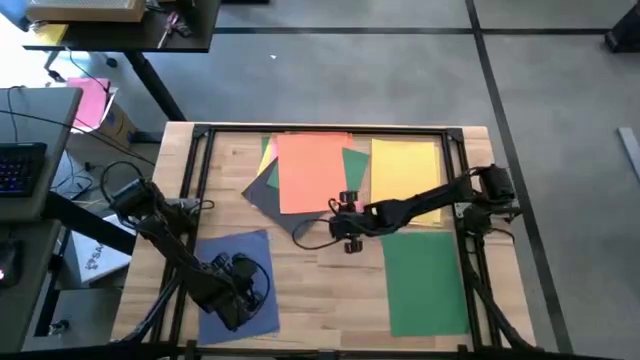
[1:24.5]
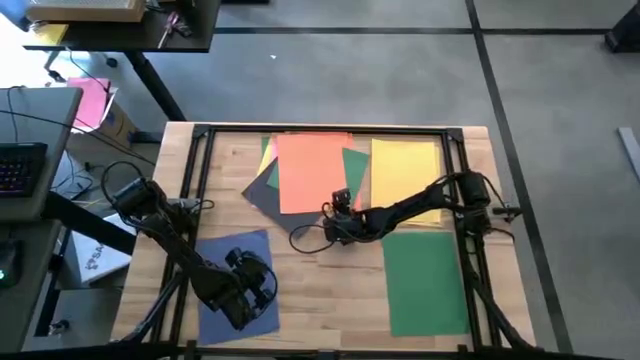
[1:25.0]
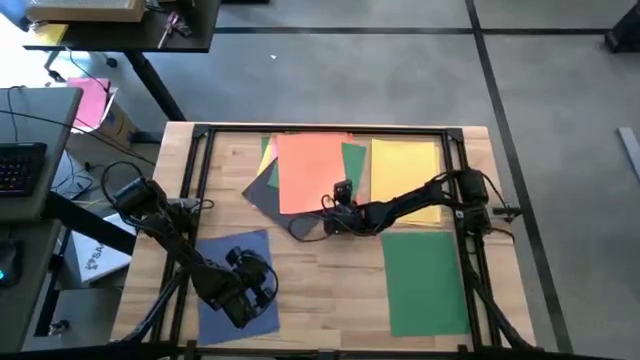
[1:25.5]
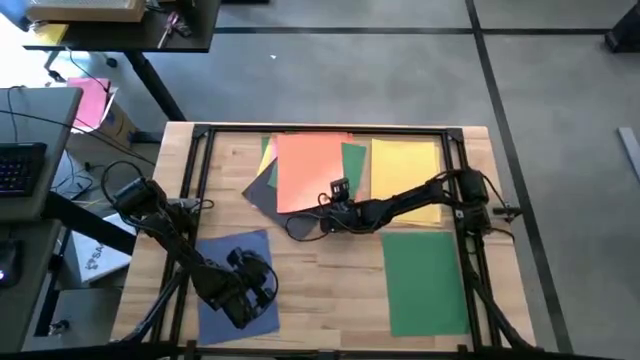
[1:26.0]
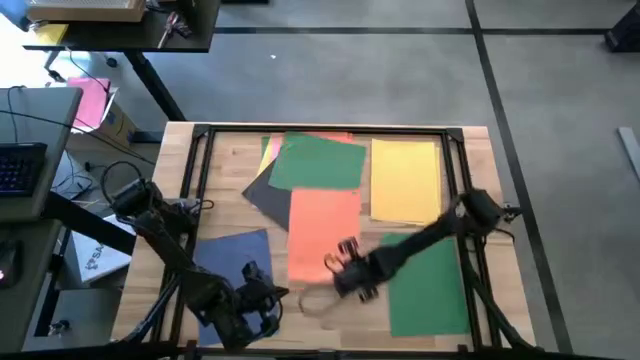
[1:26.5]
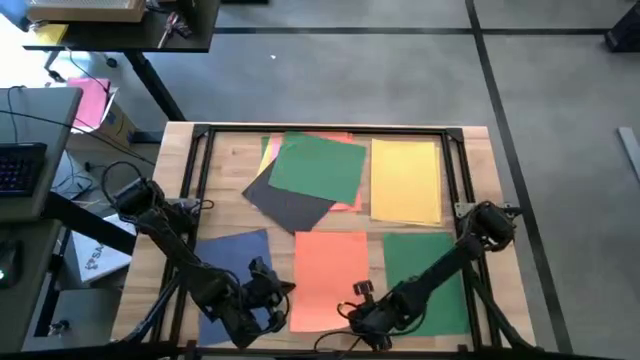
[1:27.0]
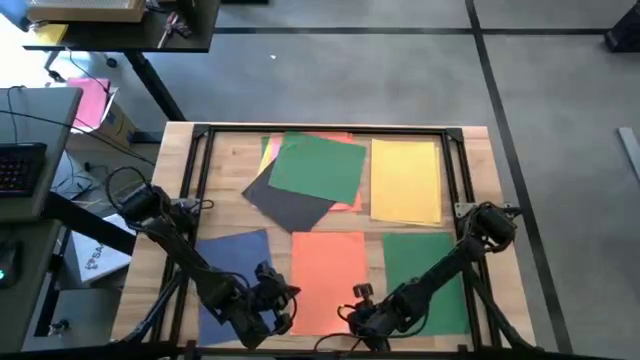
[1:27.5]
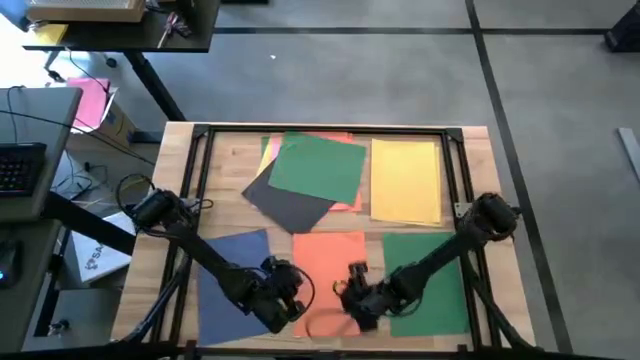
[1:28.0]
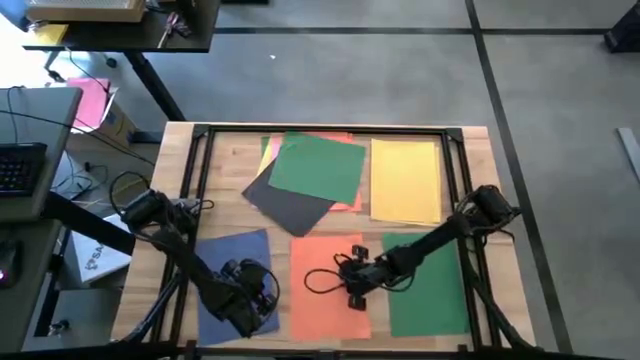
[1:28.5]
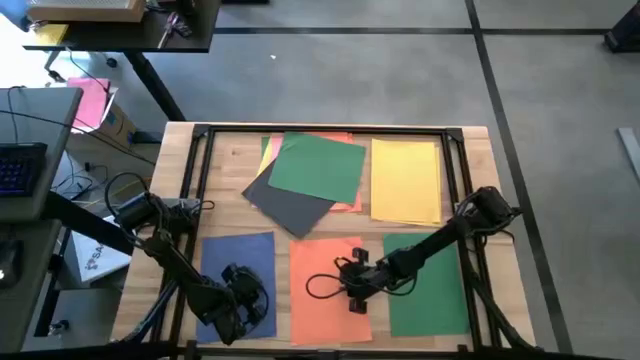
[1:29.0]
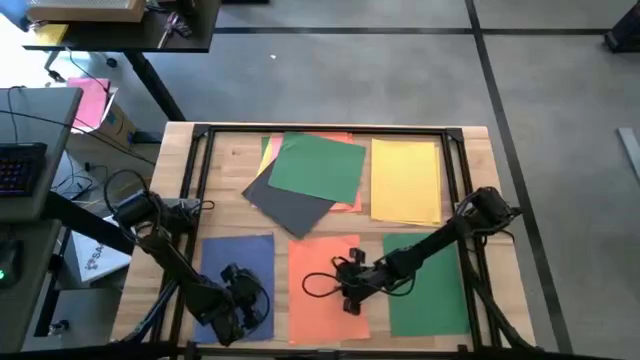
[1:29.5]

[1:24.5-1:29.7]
Task: Organize paper
Put the orange paper on the bottom center of the table

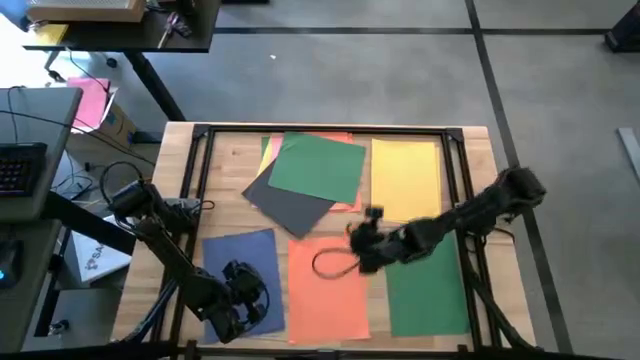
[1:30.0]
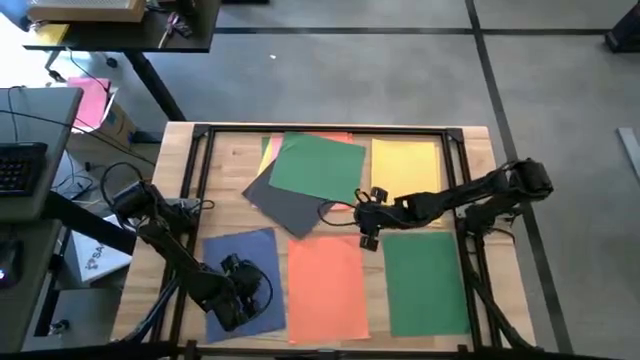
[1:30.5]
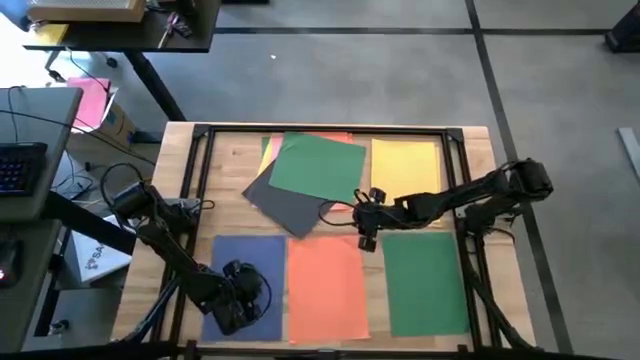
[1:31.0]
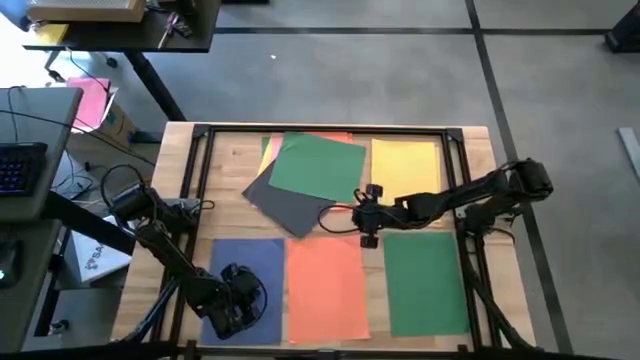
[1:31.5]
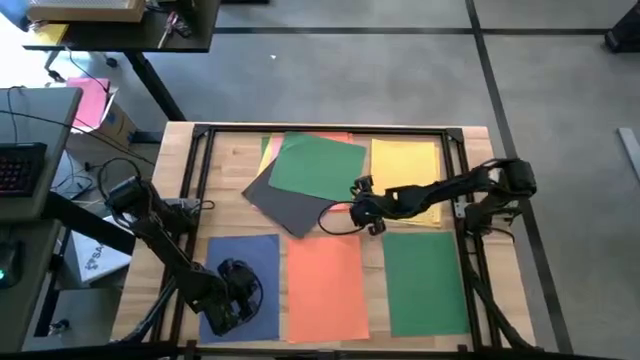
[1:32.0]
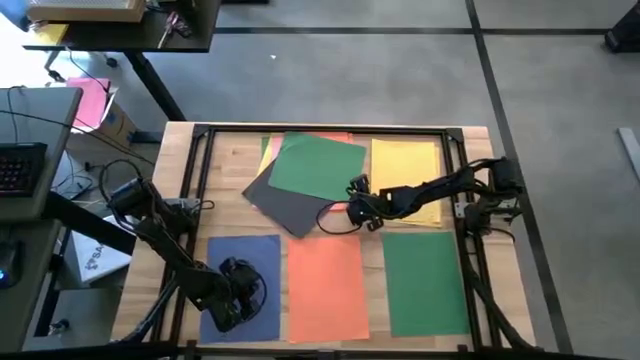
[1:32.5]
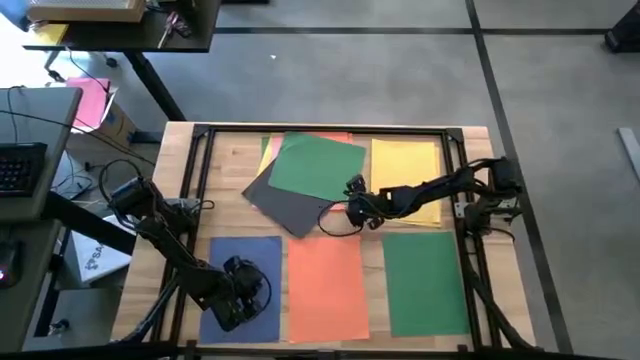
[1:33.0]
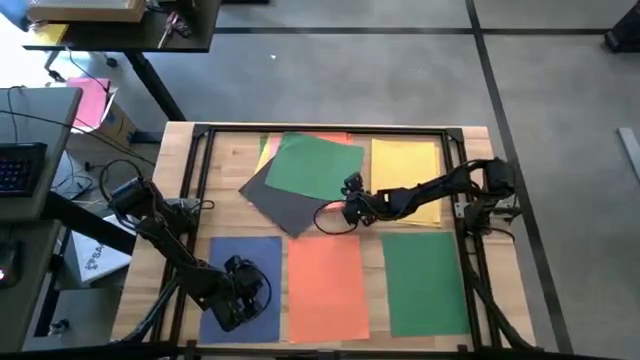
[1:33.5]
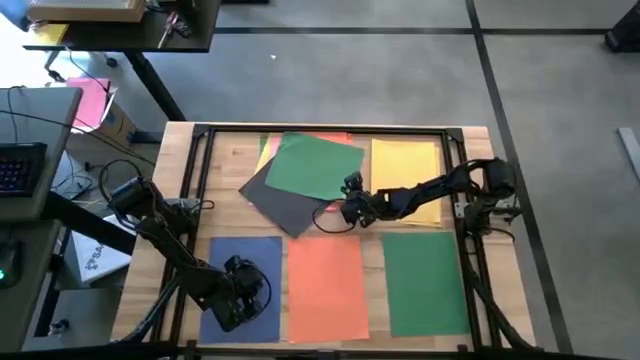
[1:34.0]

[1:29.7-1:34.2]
Adjust the bottom left violet paper

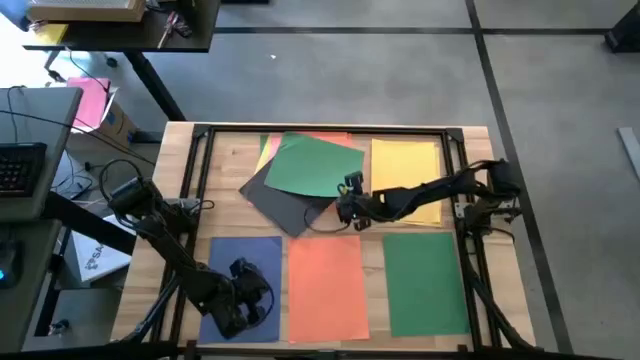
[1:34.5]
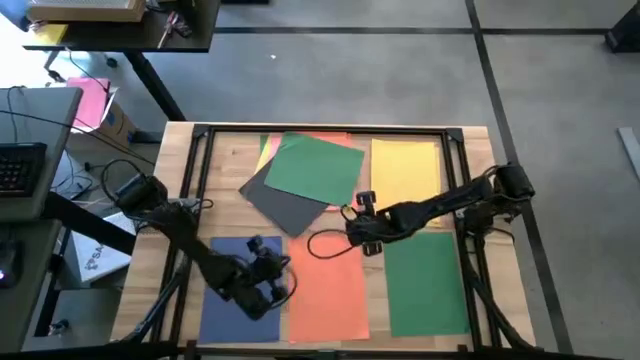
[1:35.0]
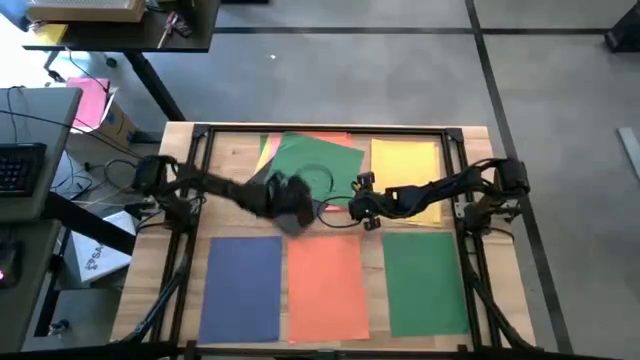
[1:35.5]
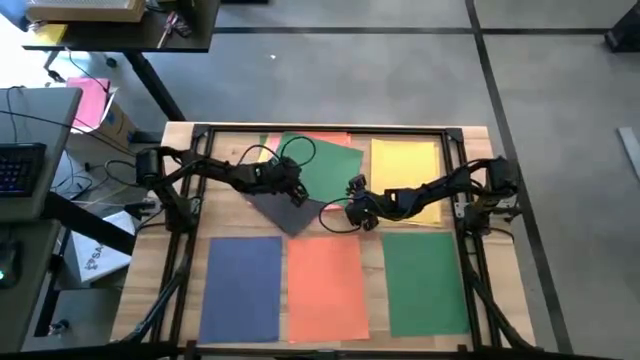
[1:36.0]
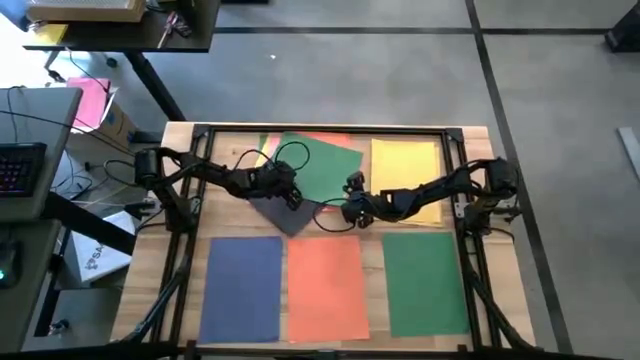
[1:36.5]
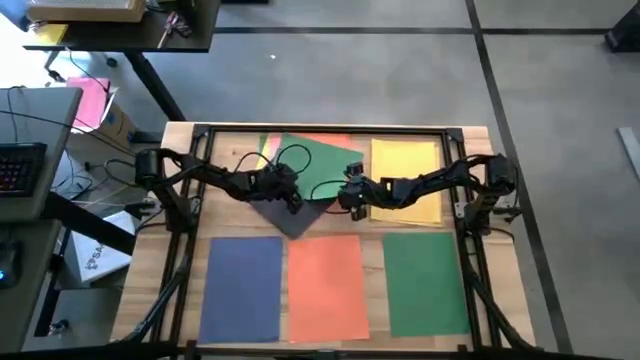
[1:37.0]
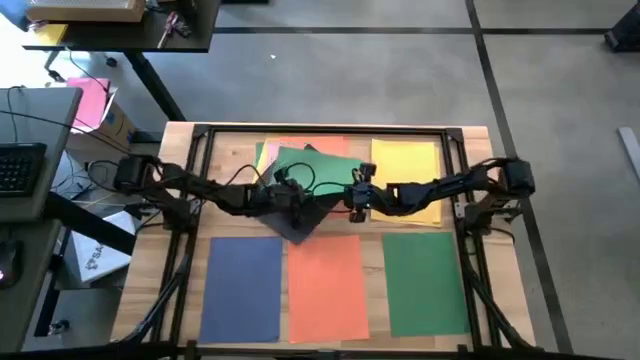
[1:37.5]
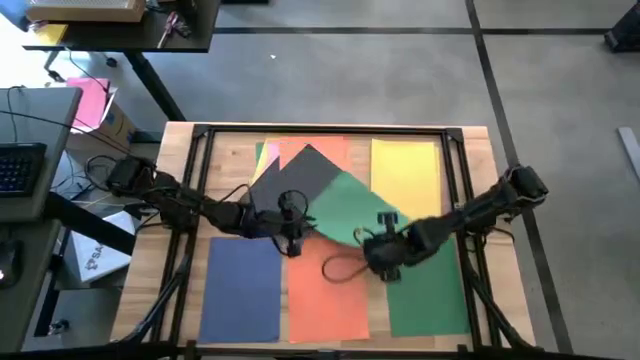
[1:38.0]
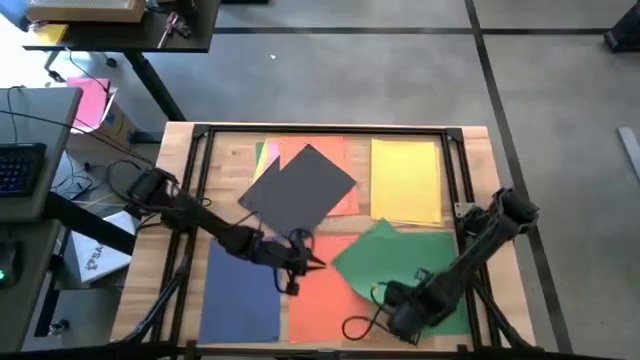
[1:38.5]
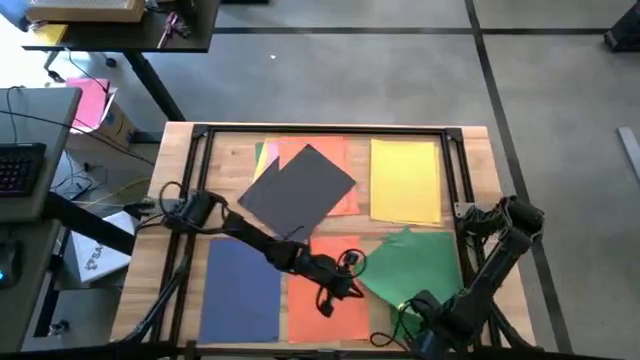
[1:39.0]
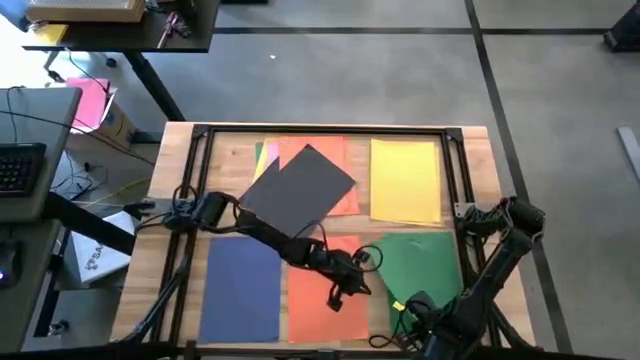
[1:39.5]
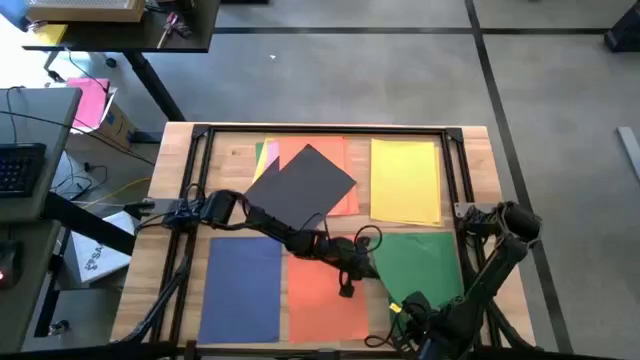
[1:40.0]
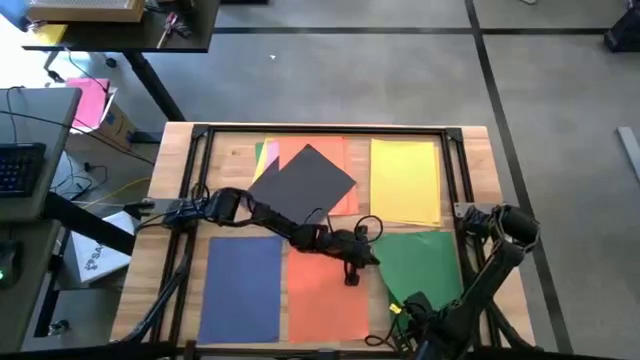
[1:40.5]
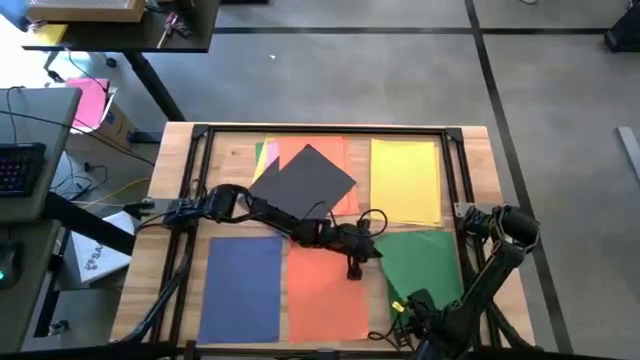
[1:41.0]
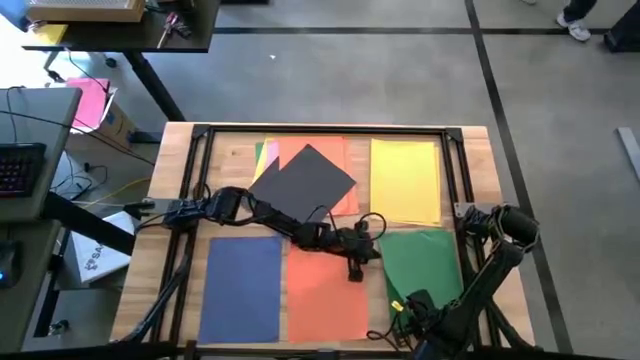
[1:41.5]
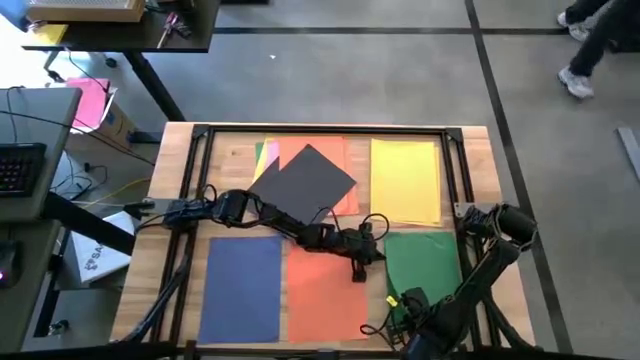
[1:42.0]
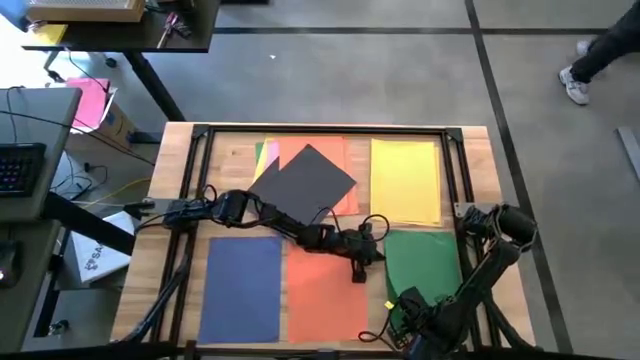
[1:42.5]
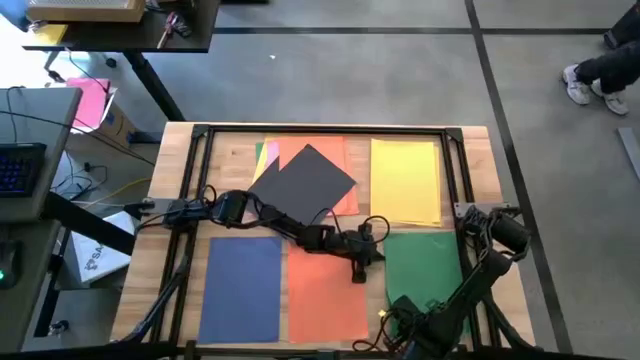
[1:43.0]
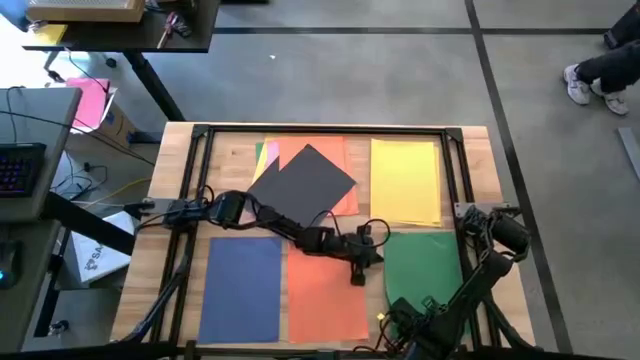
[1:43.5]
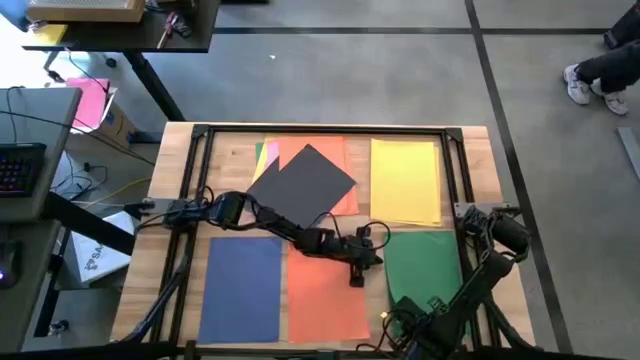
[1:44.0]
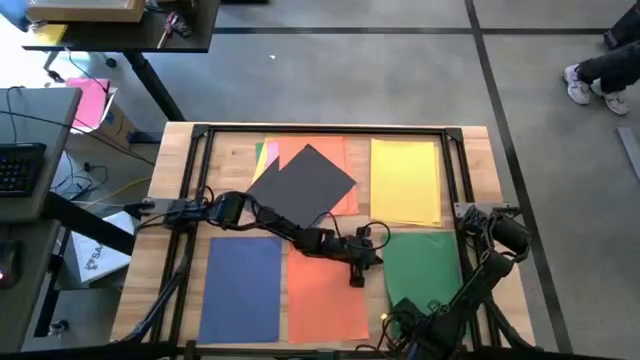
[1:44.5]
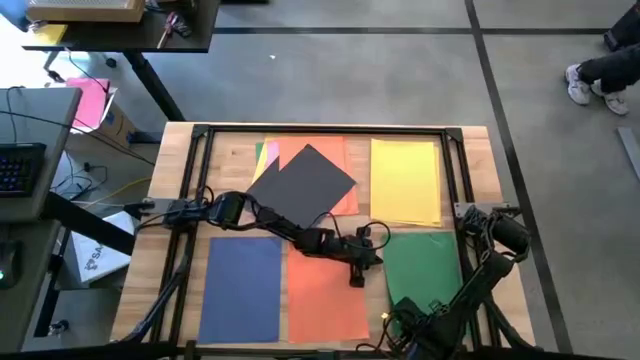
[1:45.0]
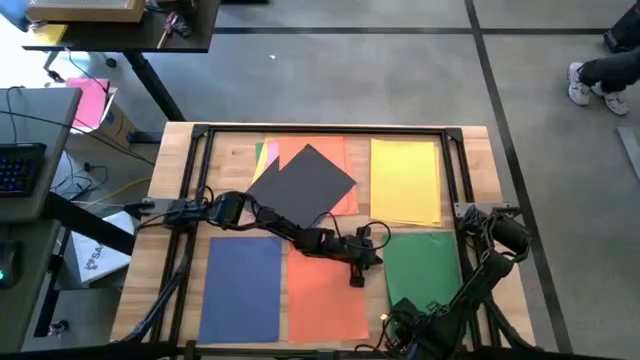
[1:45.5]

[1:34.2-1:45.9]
Stack green paper on top of the green paper
